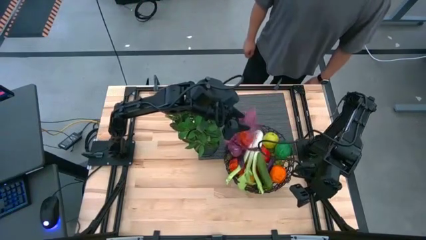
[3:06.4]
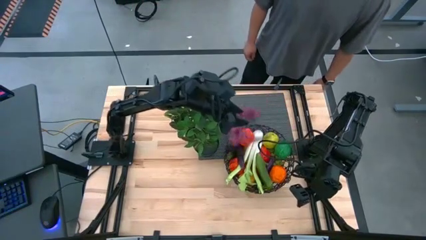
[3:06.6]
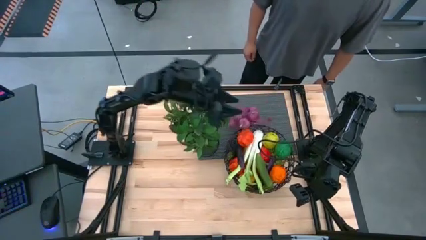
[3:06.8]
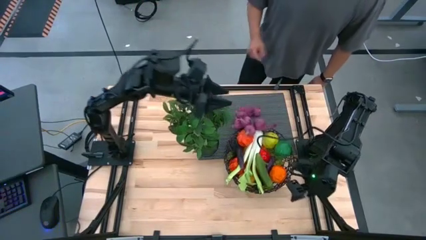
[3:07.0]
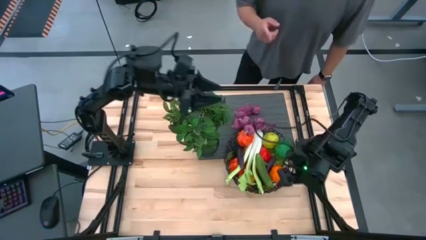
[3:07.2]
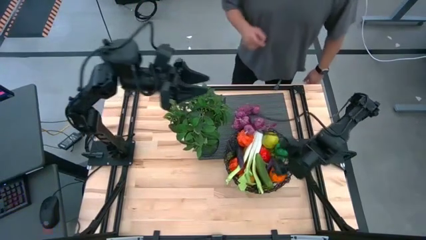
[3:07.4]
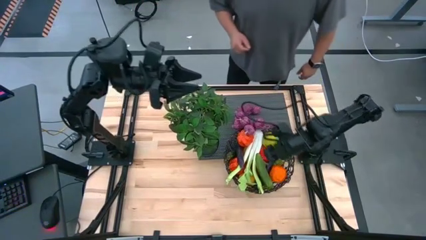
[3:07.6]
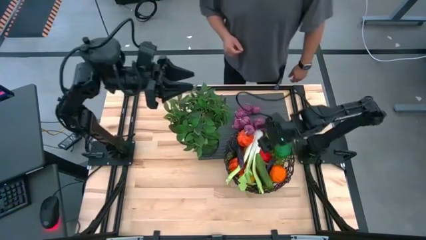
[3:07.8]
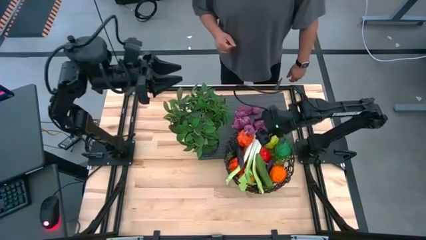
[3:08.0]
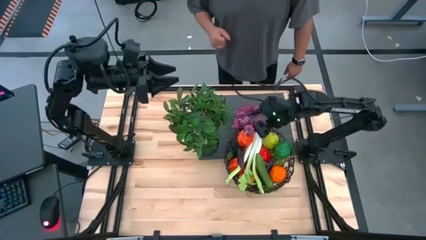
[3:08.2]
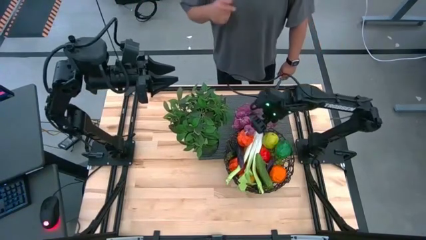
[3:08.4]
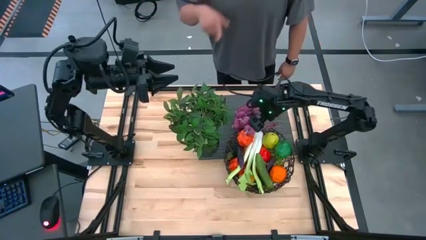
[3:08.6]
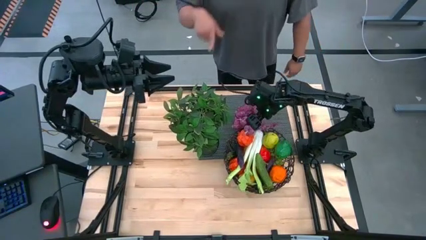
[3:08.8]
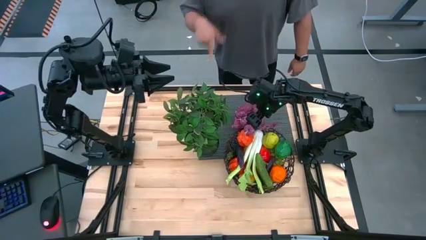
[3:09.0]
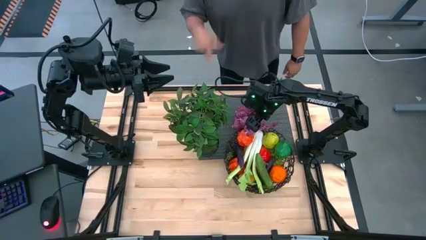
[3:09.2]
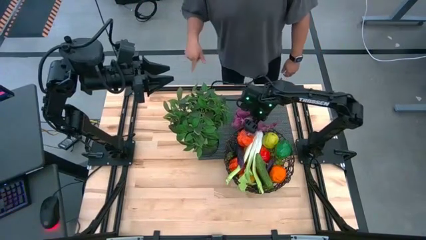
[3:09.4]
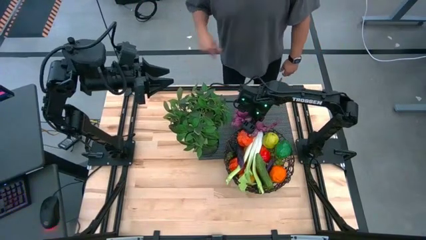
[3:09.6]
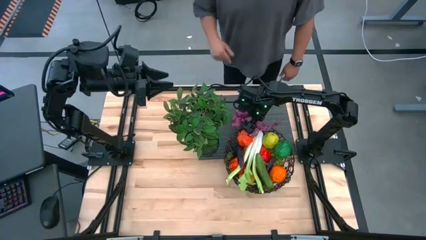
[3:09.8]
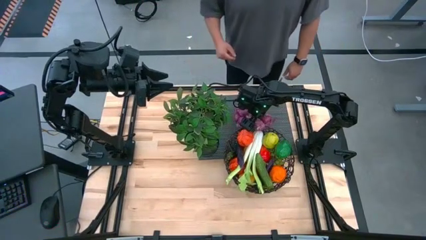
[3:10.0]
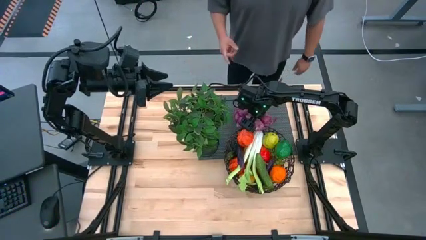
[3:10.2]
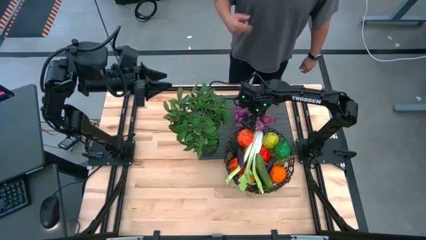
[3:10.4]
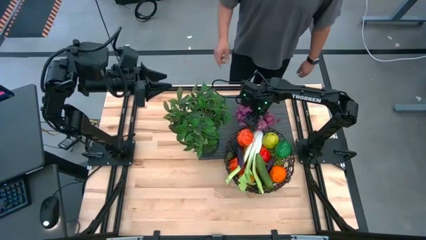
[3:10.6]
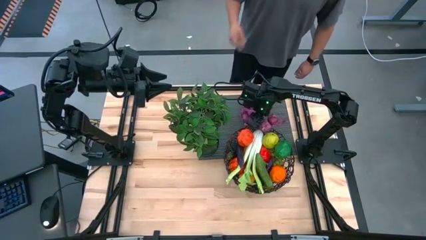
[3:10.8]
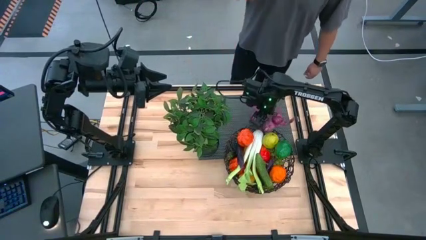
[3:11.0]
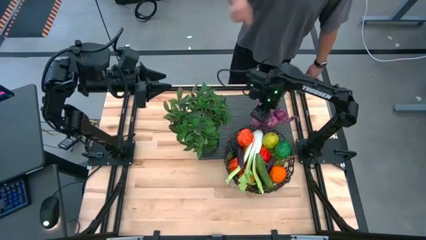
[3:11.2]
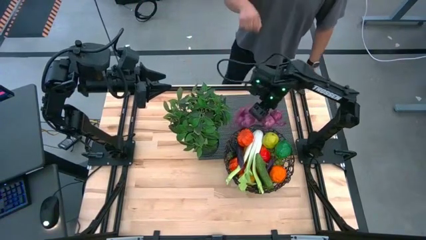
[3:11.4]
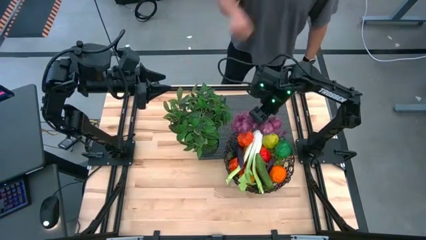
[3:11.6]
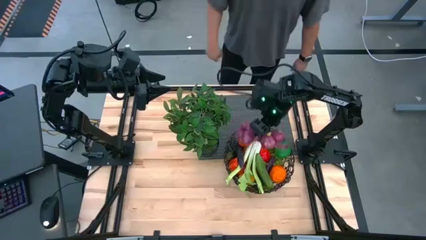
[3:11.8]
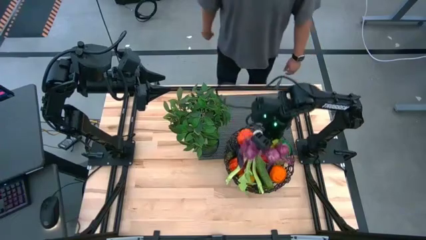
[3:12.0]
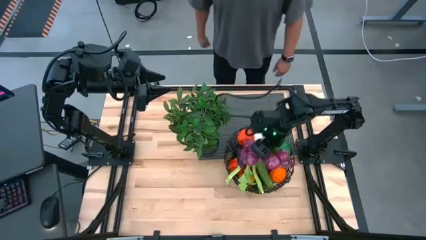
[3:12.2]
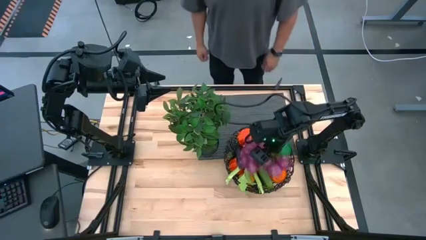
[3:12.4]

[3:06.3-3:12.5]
Task: Build produce basket
Put the purple garlic into the brown wire basket

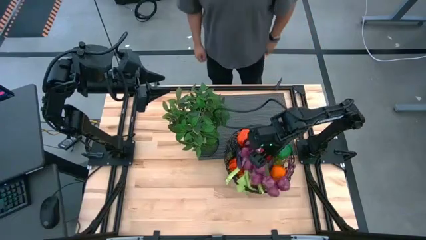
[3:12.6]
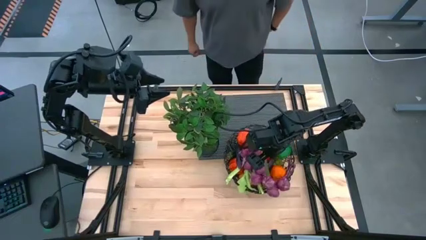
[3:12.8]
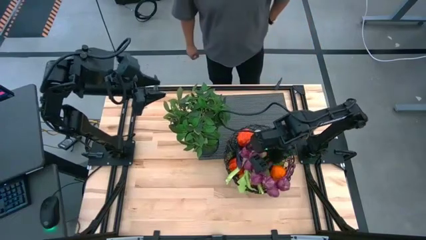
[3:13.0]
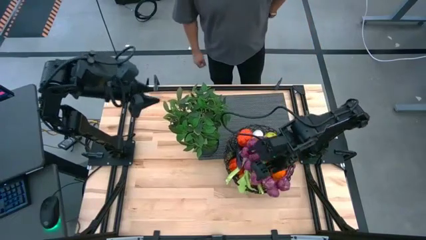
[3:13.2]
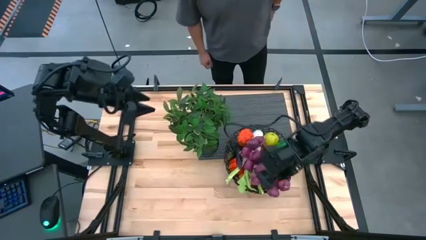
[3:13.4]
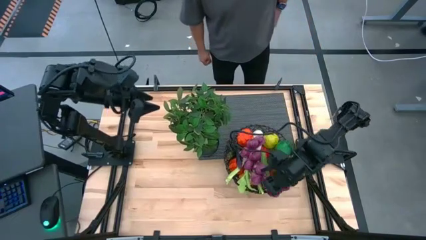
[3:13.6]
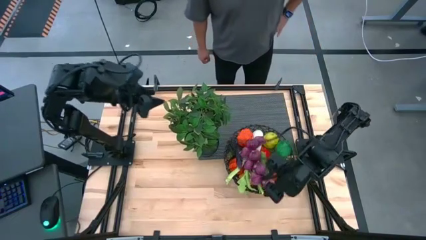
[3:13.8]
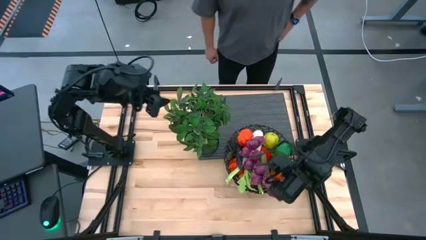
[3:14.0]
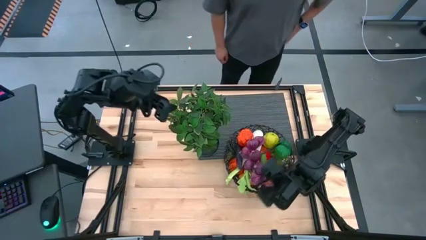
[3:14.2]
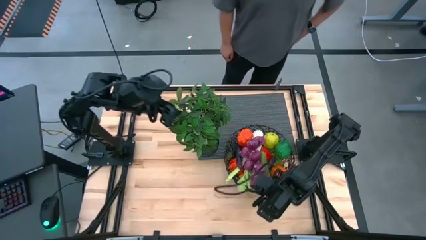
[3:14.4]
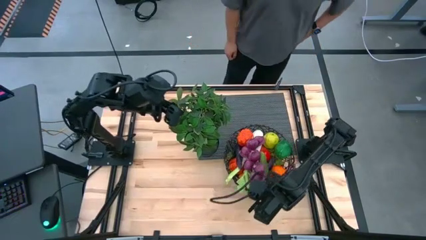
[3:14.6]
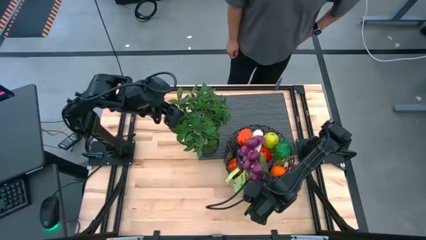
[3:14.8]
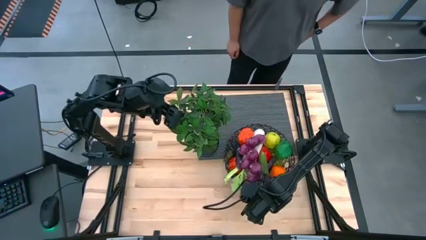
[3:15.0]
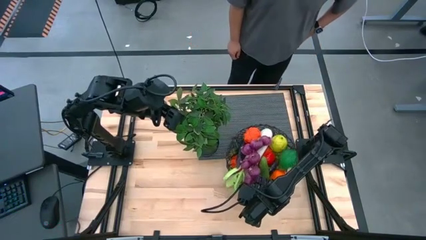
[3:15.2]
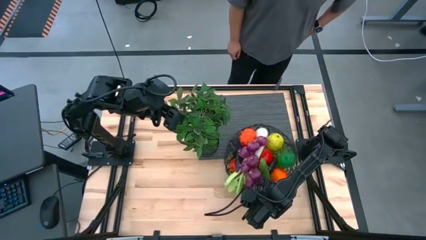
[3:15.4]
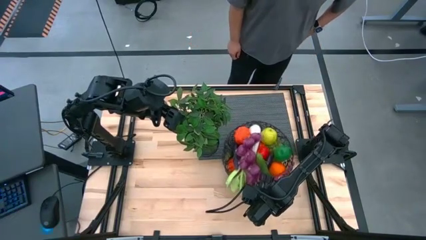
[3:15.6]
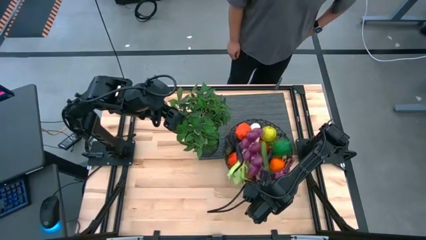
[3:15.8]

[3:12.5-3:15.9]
Move the brown wire basket to the top right corner of the table

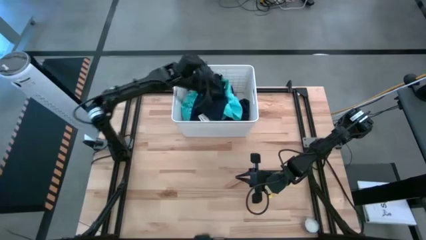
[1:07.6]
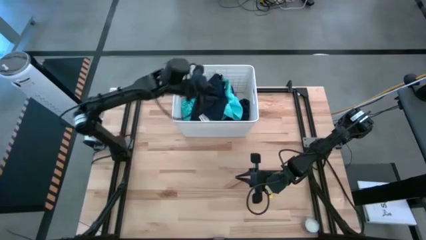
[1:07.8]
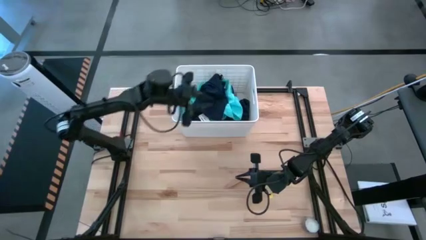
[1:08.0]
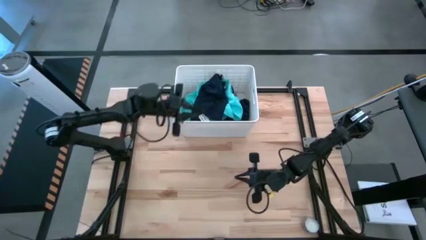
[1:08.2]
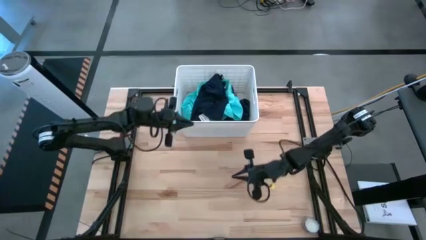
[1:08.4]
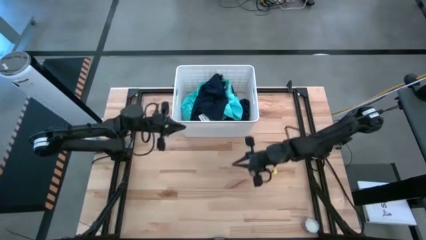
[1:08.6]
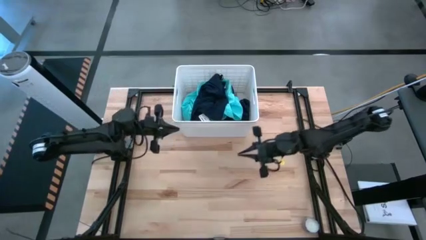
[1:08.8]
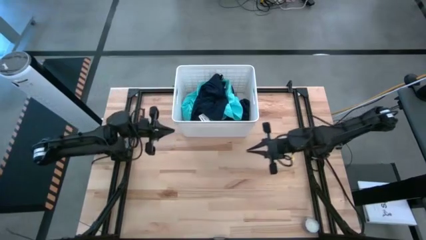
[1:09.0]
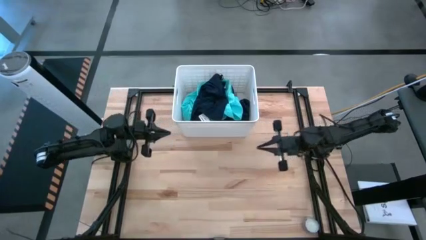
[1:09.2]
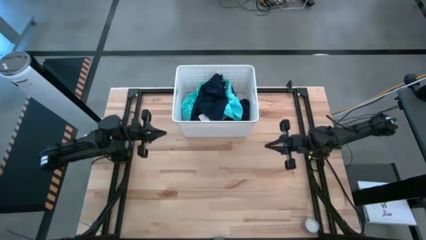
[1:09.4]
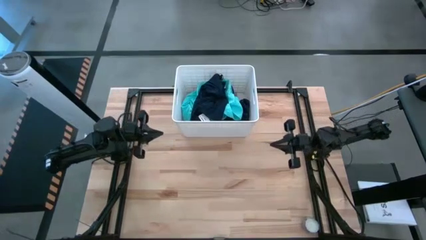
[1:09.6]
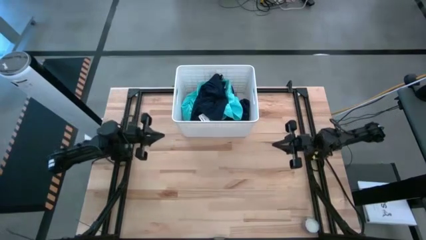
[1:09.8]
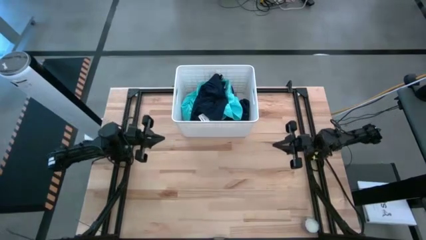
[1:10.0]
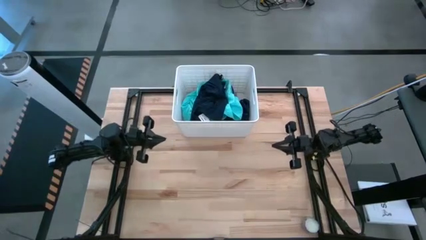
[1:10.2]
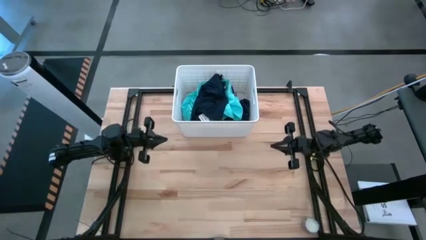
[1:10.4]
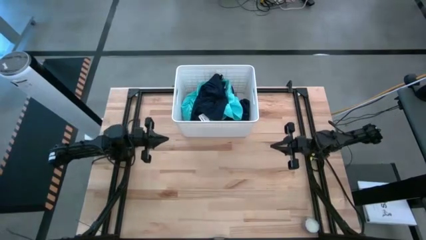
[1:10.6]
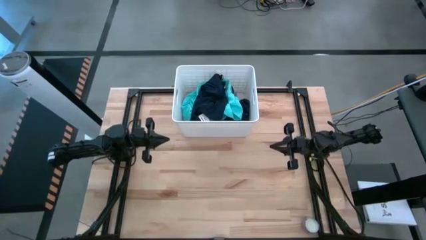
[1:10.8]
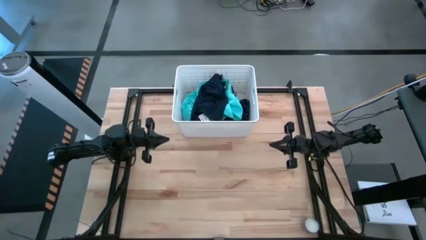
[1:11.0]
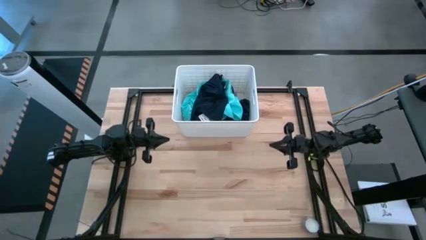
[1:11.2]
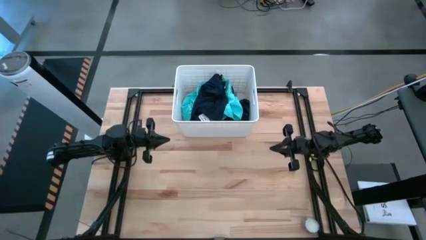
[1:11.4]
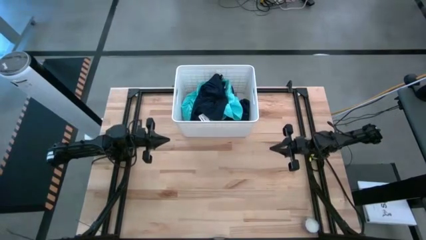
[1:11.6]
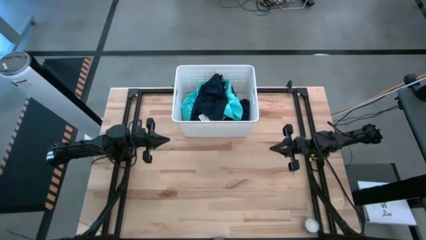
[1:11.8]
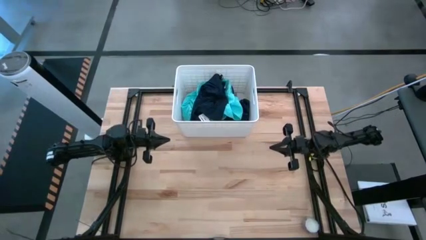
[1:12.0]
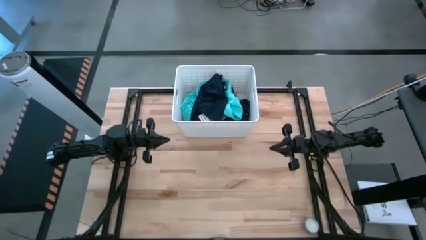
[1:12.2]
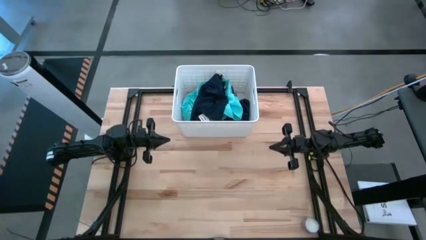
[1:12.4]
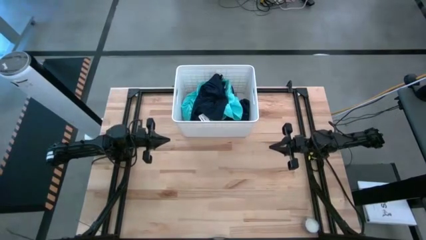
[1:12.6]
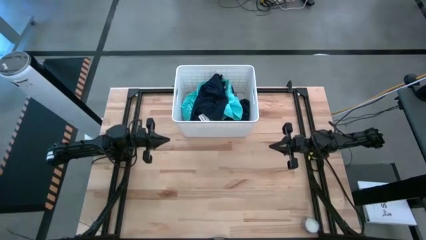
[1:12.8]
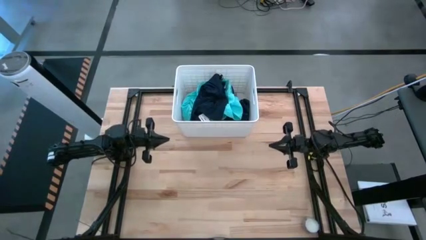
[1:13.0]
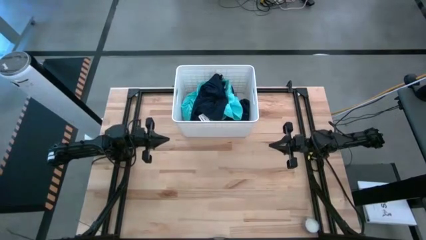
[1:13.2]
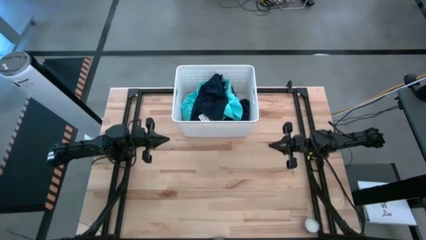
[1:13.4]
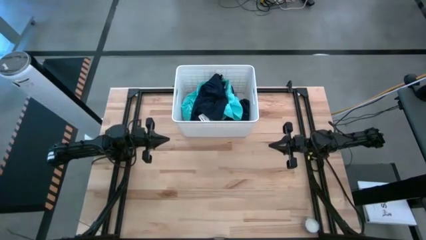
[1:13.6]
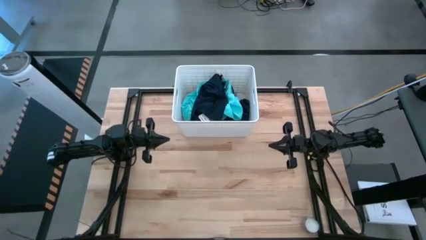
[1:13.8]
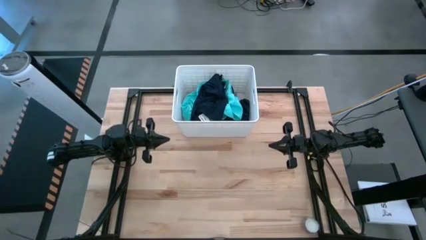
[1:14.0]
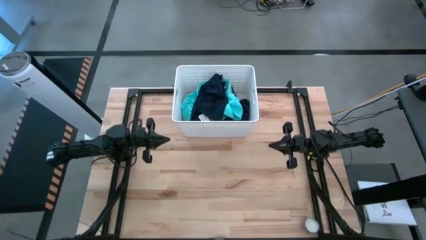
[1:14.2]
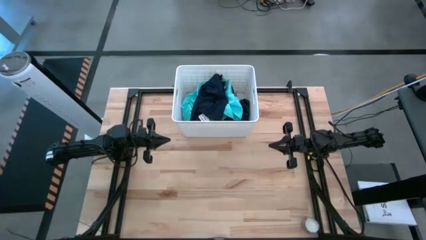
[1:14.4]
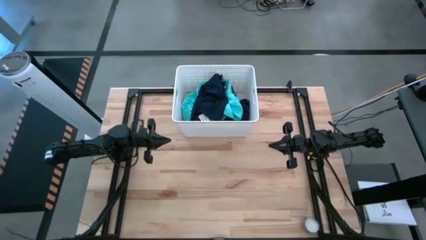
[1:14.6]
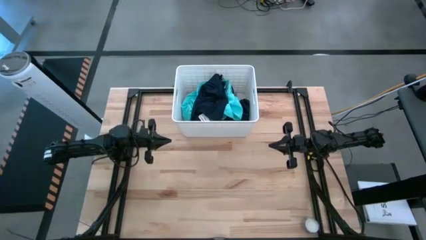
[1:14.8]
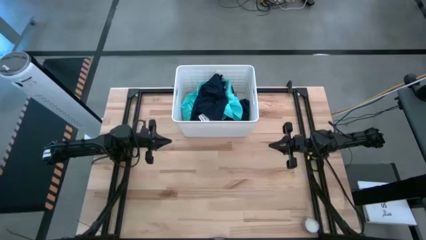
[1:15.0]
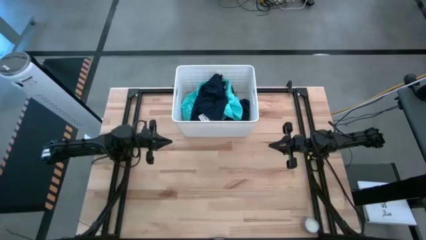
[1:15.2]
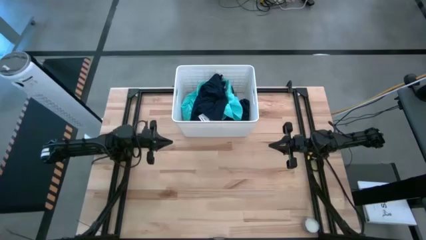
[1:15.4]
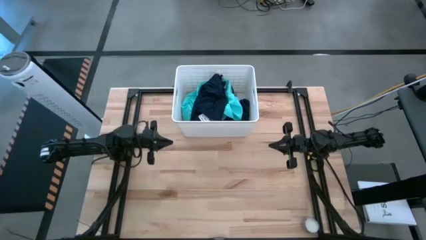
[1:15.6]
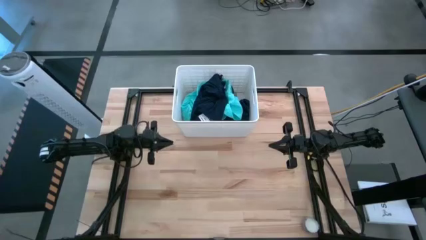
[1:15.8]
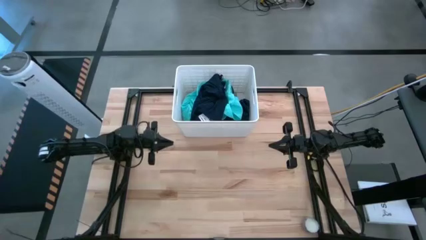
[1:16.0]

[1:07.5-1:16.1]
Task: Sort clothes
Return to Home Position
